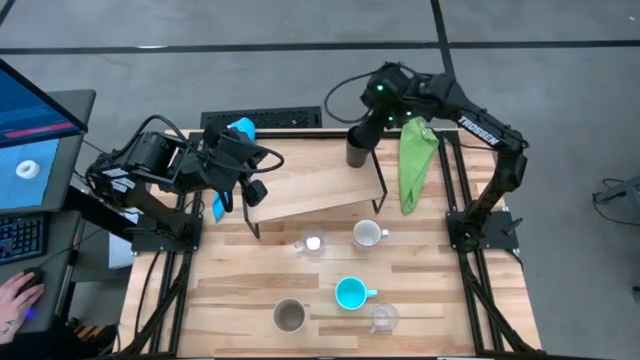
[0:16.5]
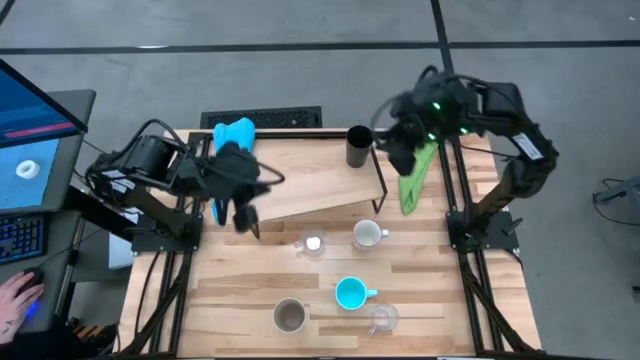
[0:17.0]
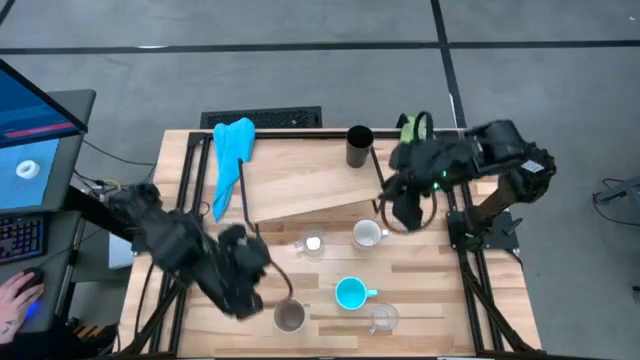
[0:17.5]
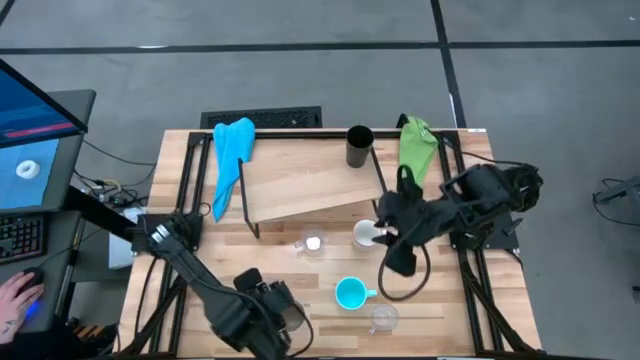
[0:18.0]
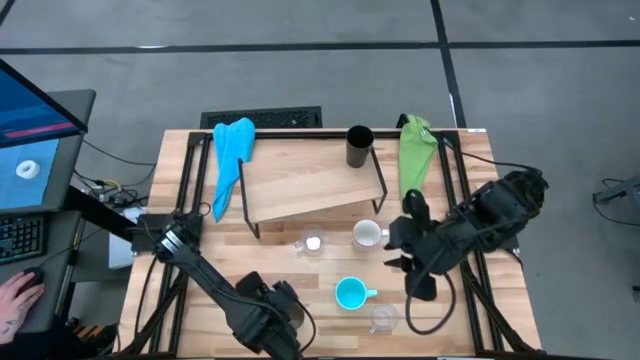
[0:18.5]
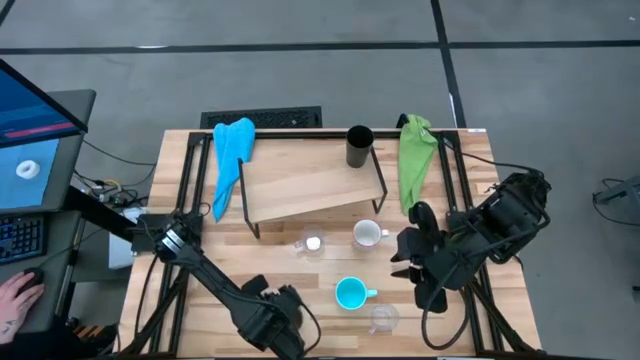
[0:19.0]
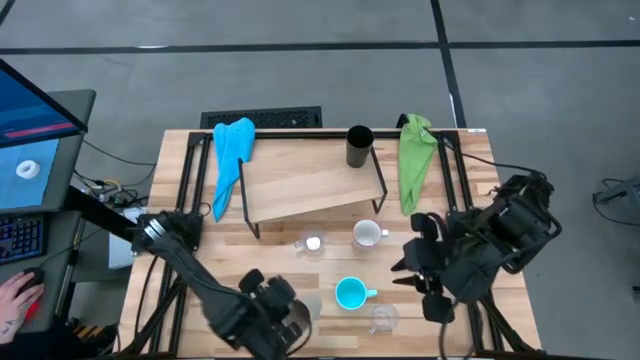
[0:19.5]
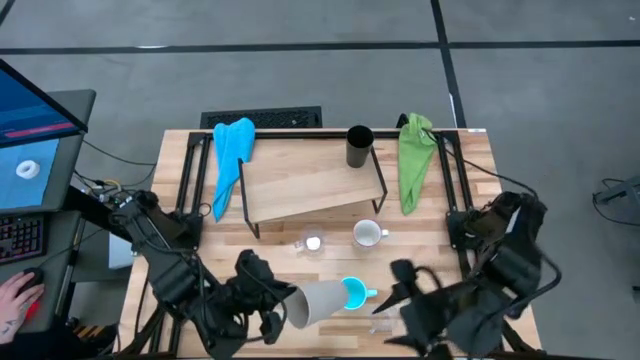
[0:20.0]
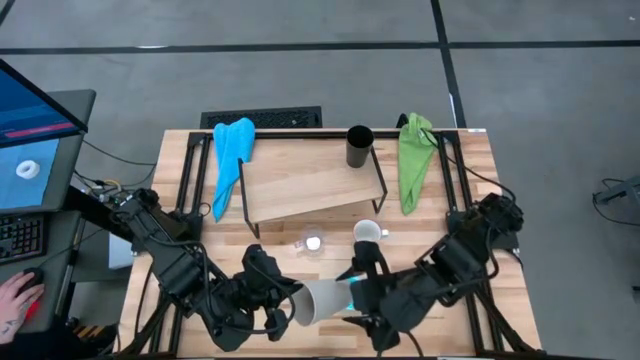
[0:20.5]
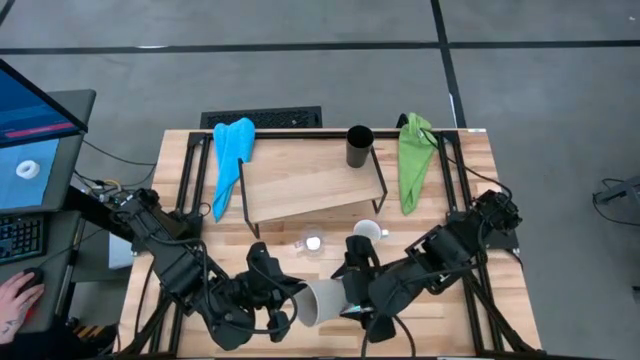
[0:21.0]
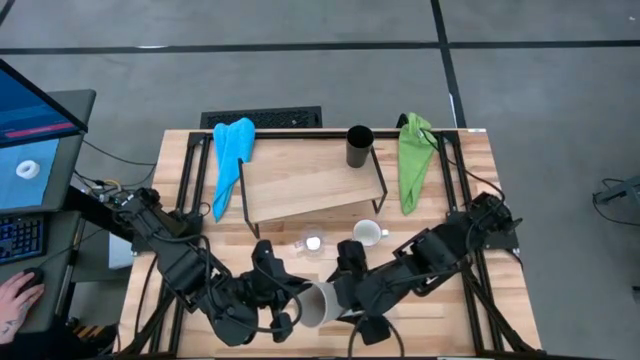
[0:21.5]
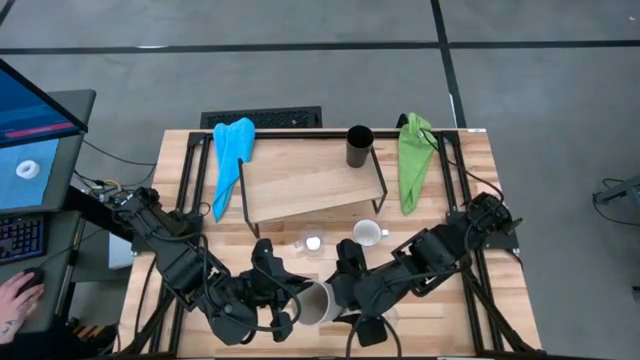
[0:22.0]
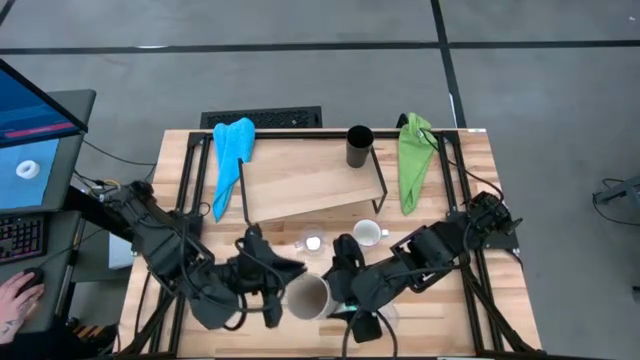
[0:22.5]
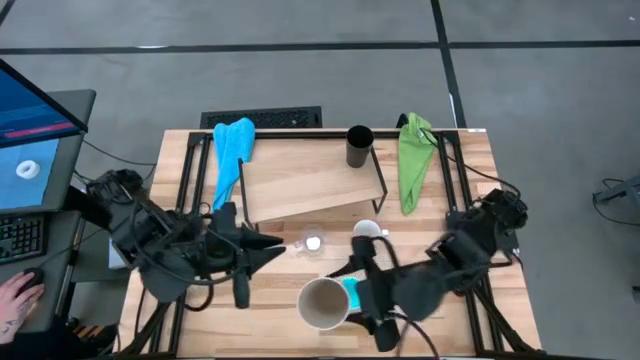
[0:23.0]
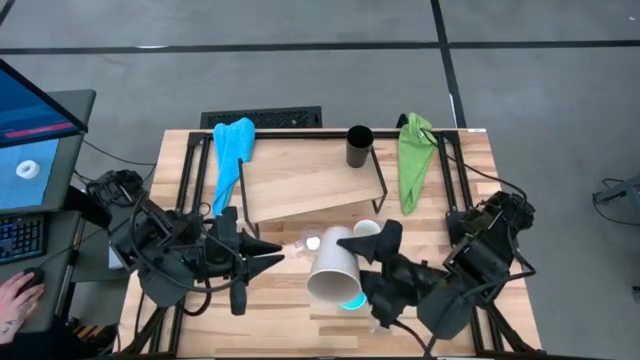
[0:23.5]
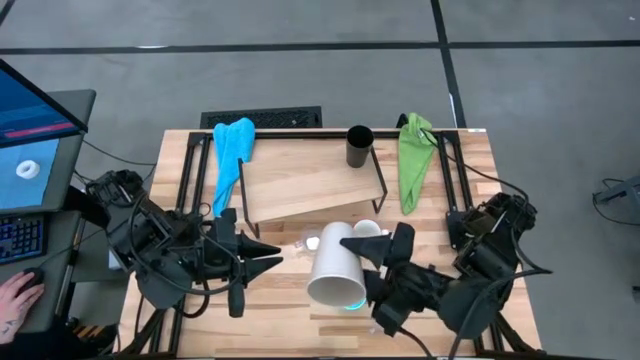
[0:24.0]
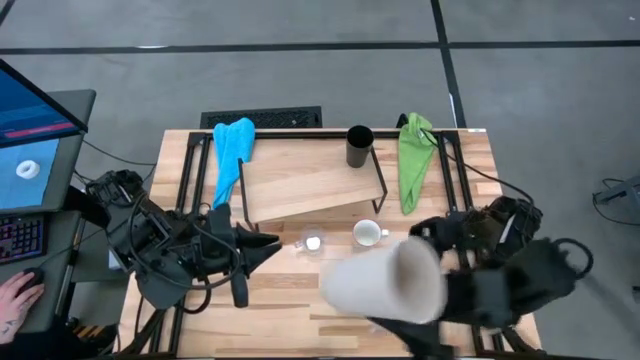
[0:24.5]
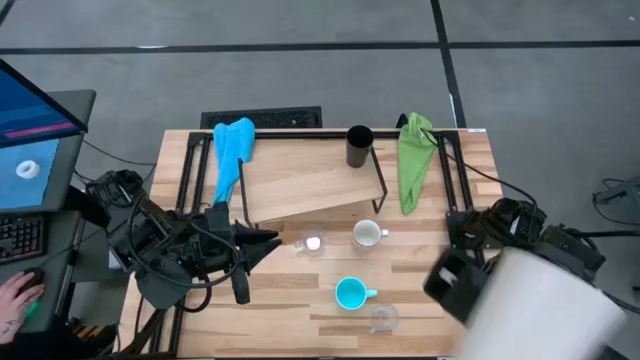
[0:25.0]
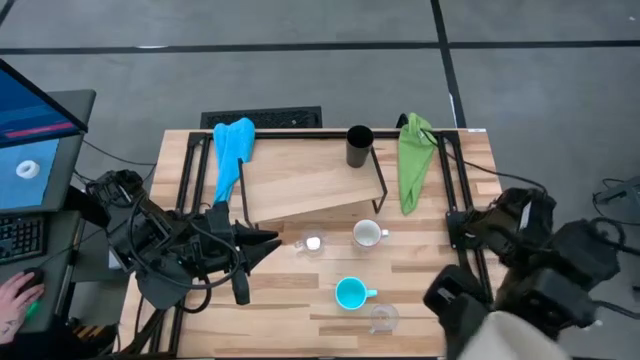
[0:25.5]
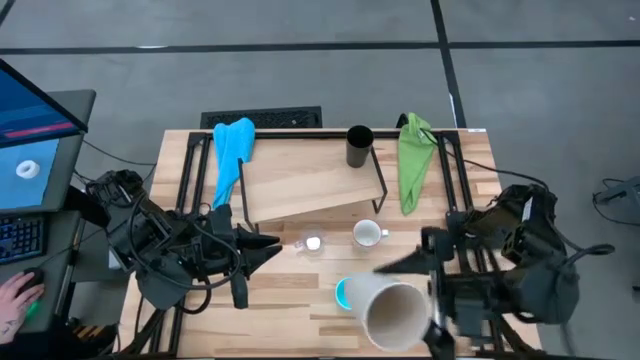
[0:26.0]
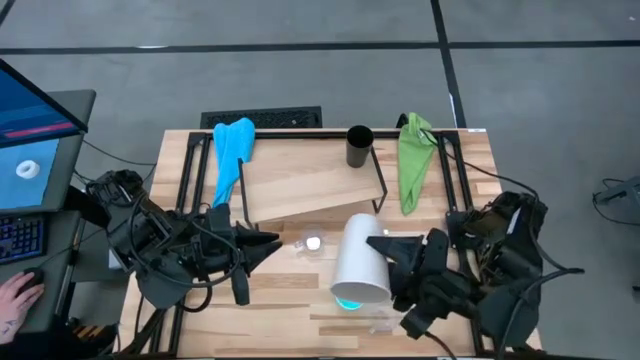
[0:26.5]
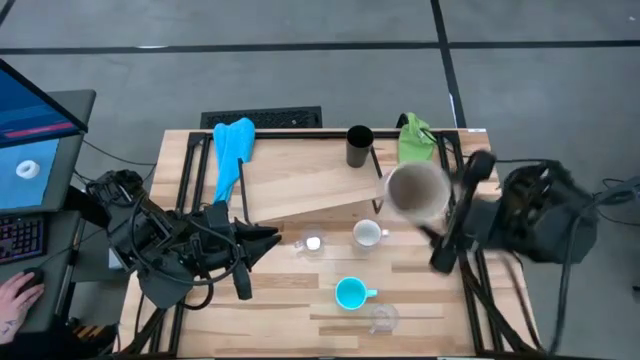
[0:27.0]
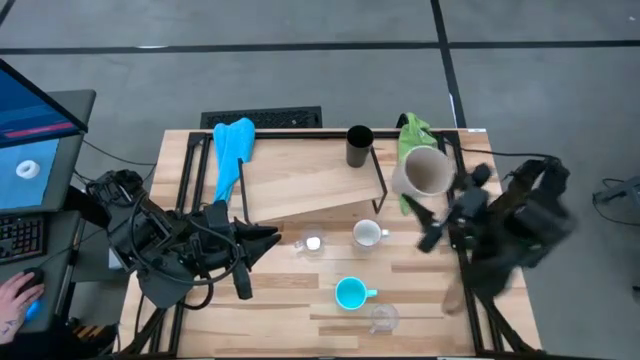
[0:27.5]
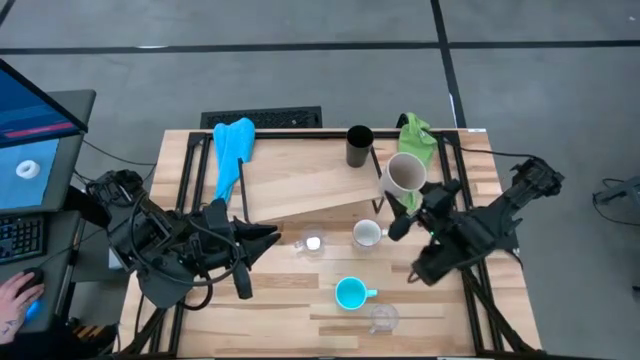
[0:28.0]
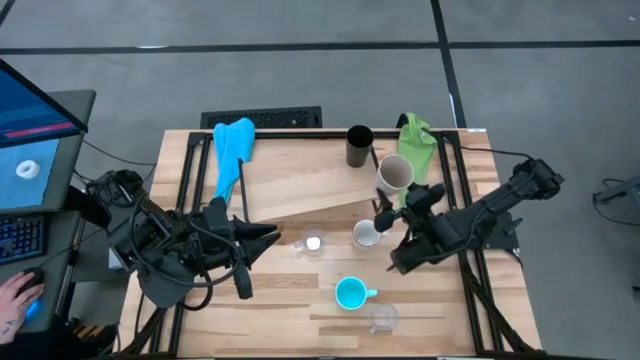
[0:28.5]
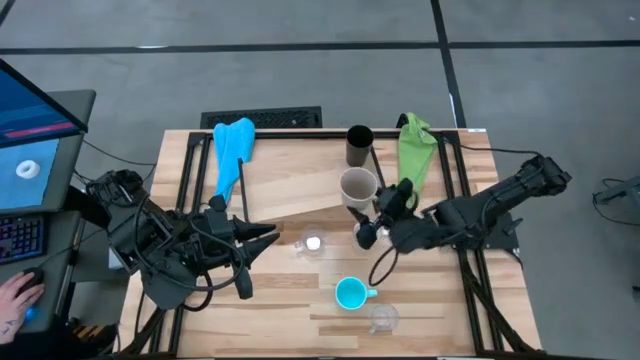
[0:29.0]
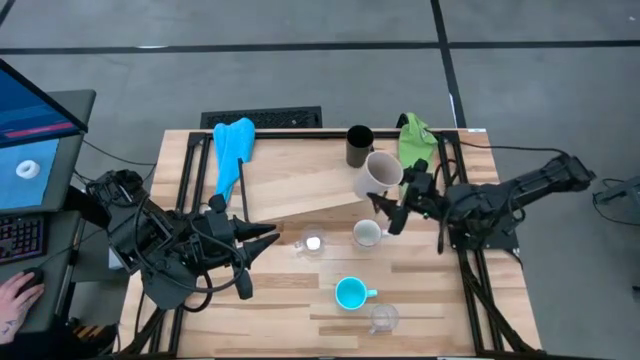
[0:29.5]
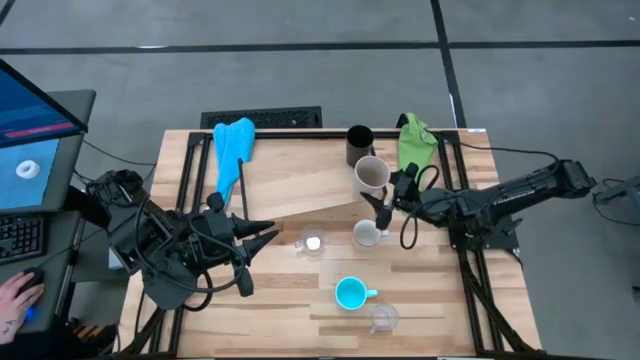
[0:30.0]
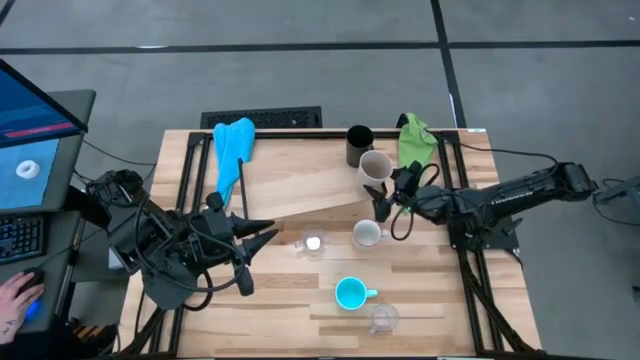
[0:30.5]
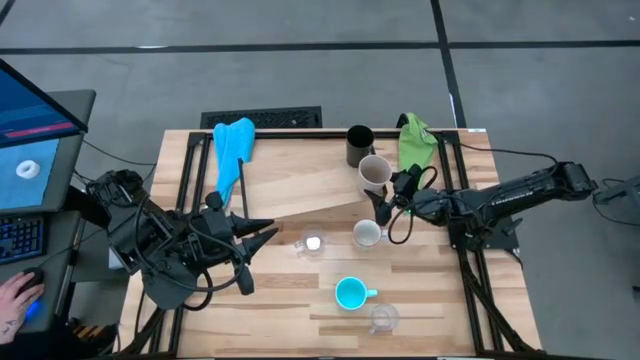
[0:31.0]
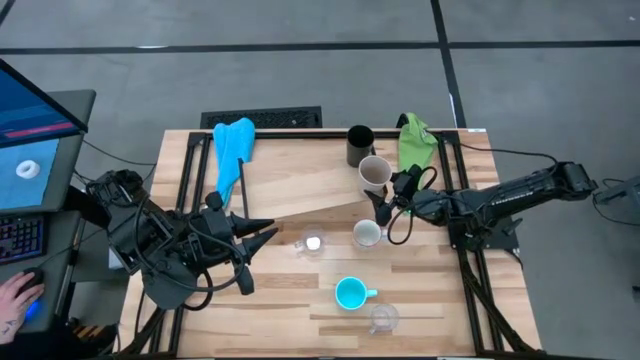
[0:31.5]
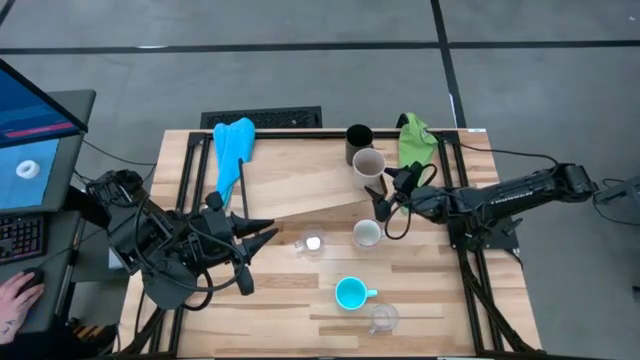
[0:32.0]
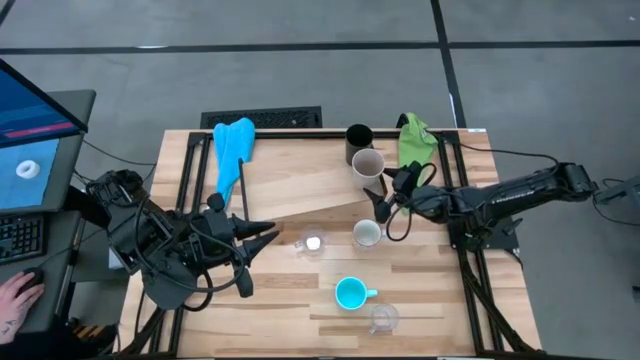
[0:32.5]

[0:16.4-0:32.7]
Task: Stack small to large cups/mugs on shelf
Put the gray cup on the shelf
